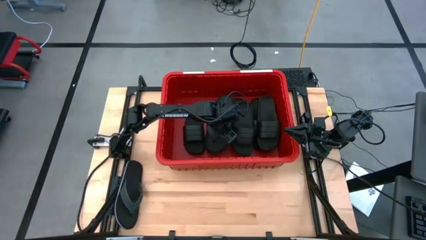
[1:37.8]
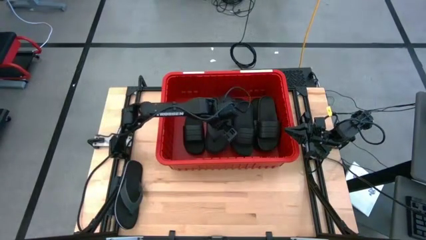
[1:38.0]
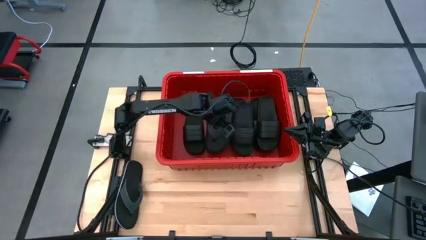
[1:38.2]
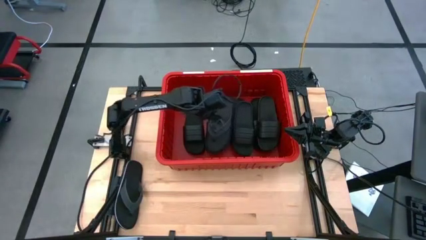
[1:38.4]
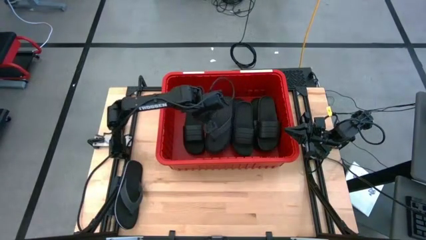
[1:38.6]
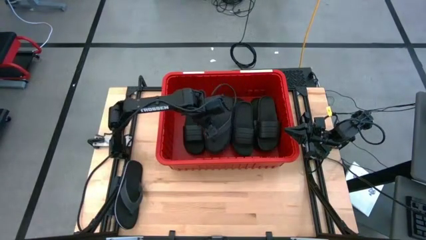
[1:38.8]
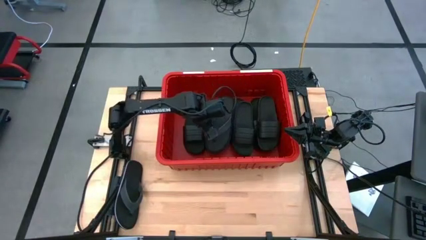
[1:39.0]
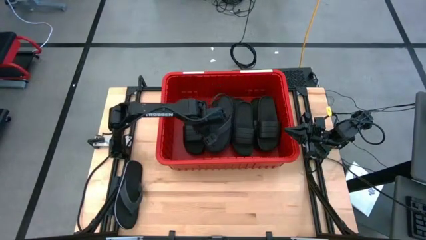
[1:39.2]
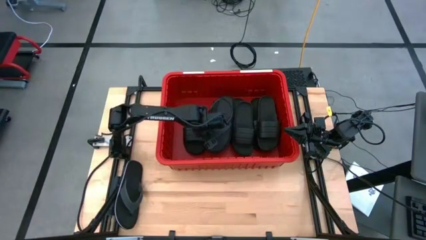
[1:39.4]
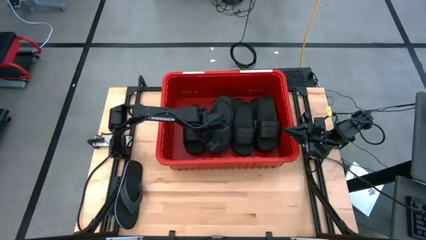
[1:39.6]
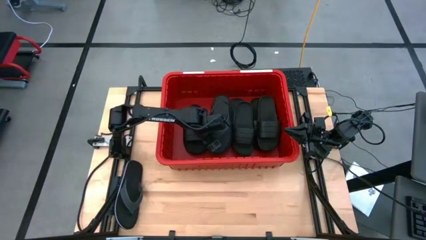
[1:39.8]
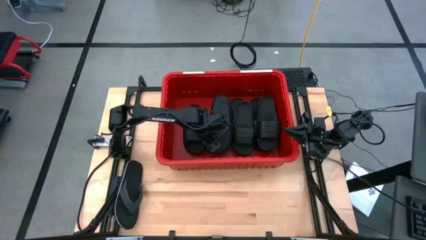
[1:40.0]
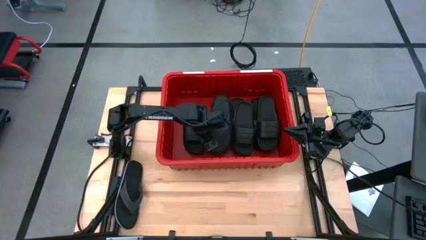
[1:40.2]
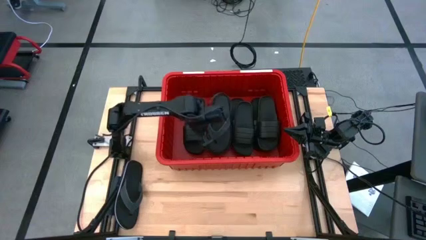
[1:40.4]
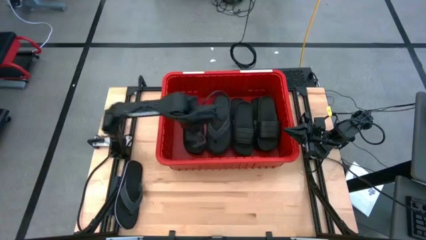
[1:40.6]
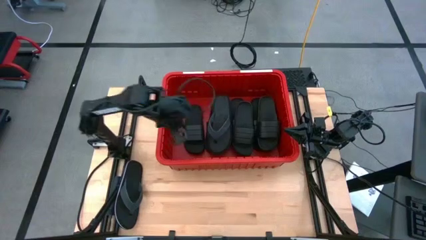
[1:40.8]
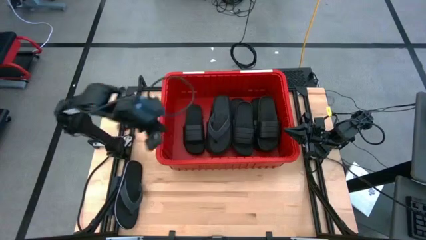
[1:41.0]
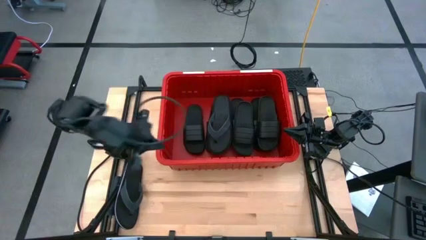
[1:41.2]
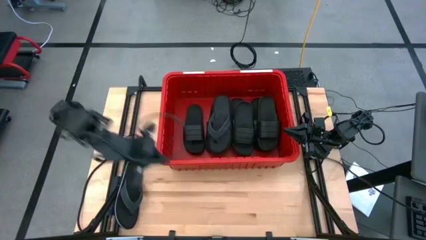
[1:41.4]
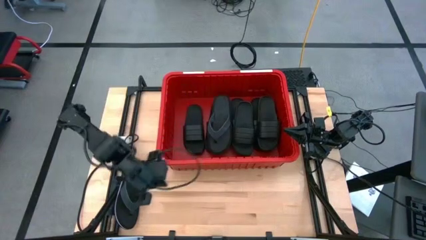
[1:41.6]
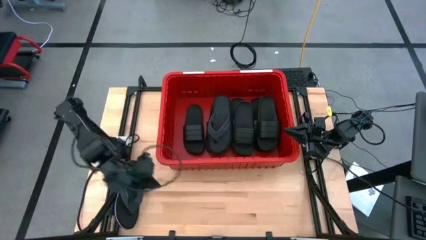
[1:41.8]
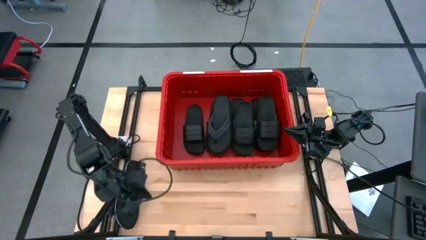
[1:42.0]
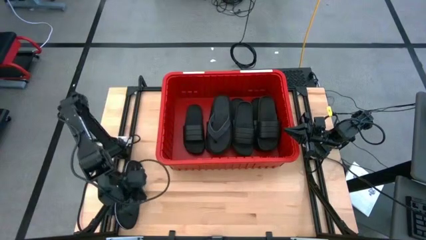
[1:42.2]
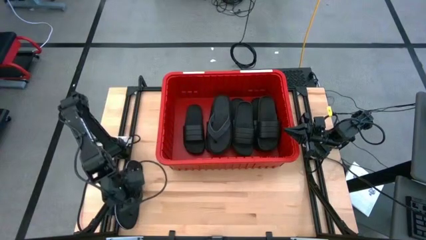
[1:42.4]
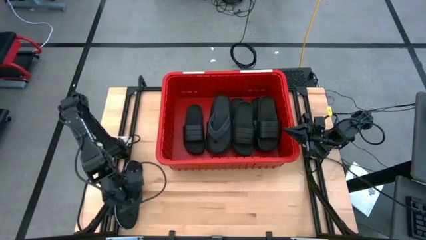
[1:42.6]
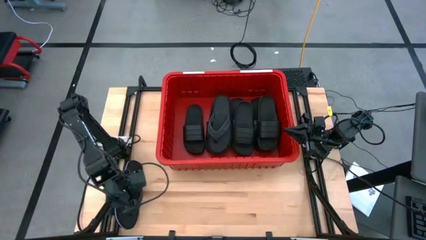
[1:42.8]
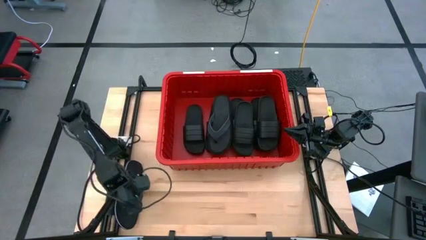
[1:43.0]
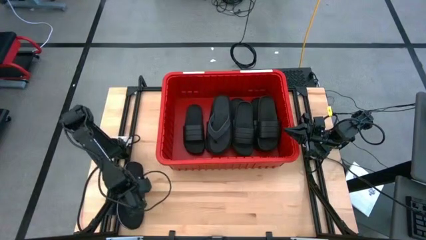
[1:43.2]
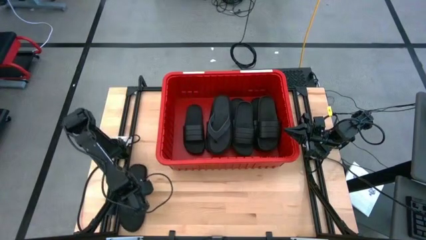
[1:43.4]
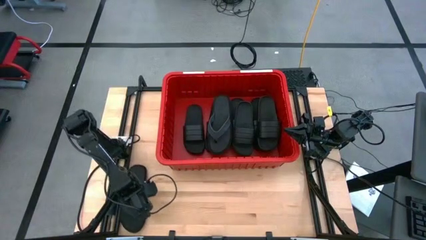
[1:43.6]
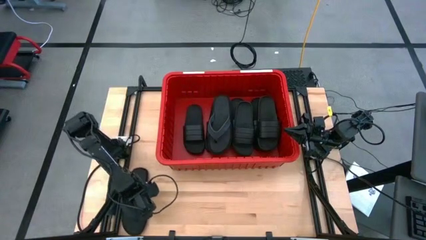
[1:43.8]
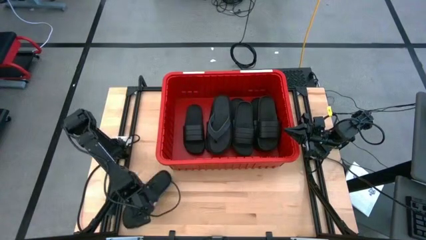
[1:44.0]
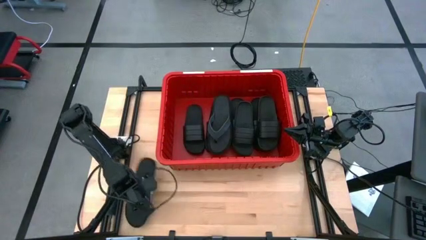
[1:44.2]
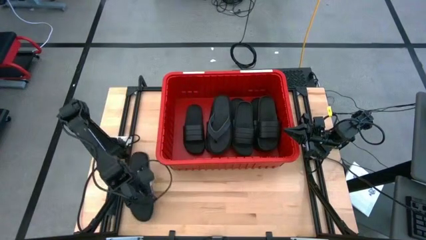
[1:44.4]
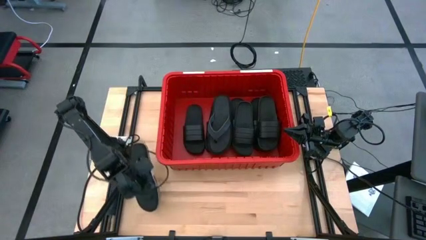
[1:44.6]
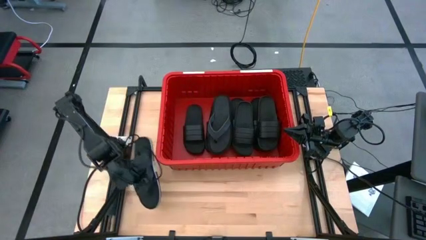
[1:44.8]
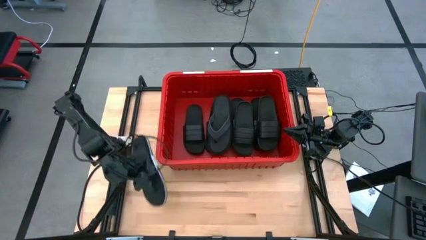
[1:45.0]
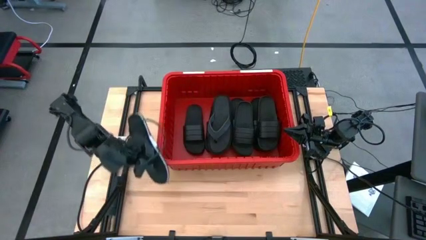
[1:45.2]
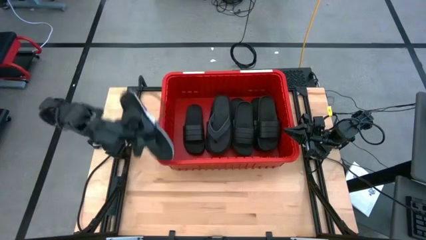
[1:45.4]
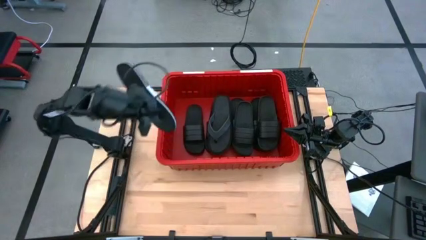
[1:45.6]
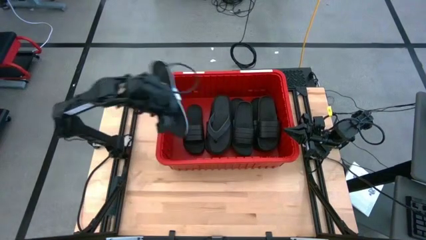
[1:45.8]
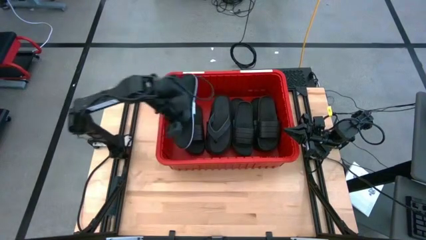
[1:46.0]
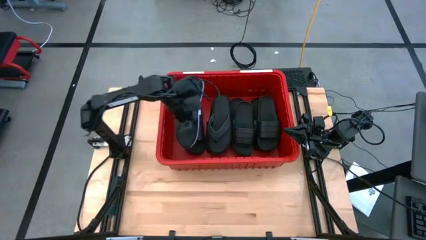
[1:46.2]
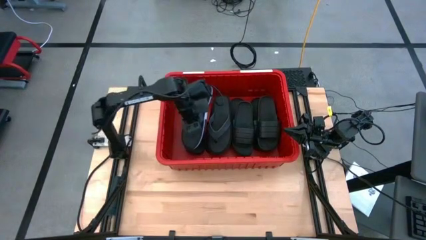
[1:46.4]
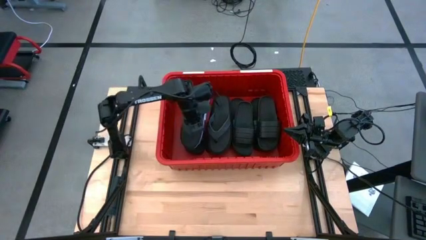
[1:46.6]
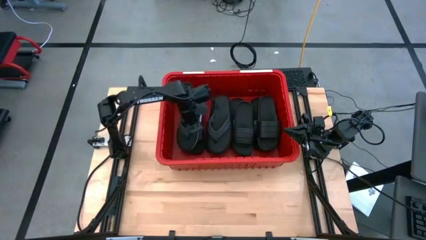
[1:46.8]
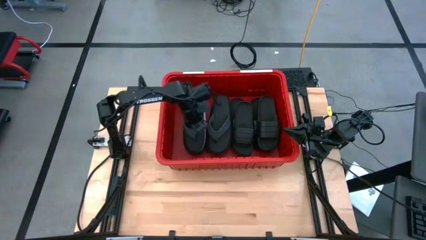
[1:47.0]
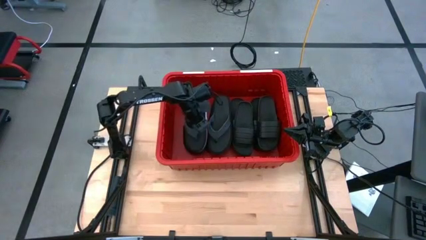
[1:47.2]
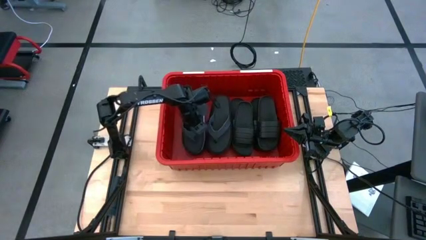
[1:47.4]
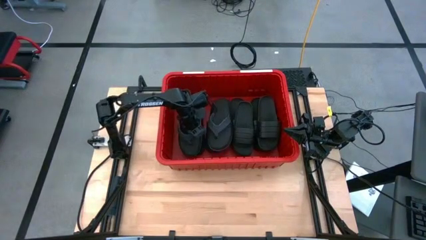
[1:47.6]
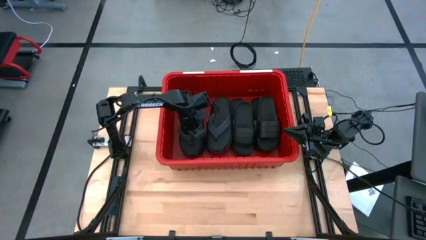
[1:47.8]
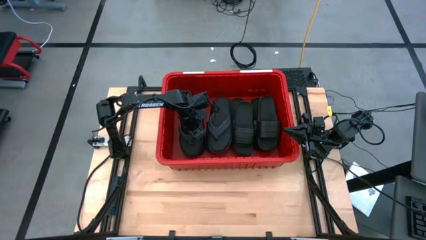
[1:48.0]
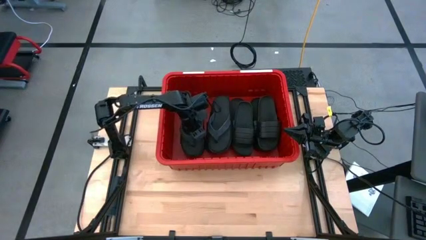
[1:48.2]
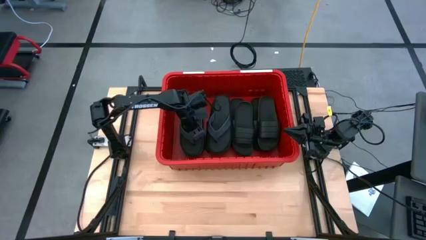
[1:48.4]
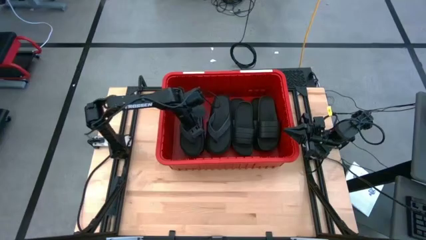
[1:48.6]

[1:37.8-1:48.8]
Task: Pick and place slides into bin
Put the black slipper into the red bin

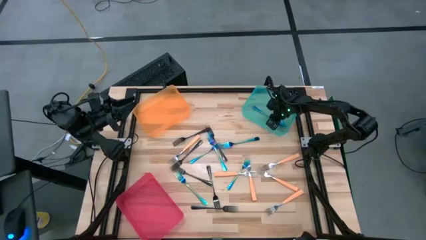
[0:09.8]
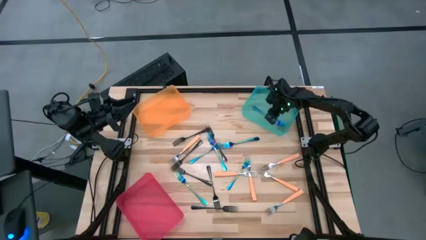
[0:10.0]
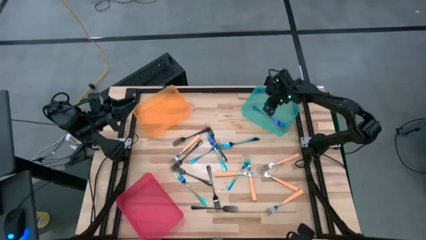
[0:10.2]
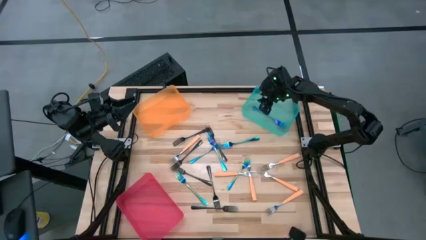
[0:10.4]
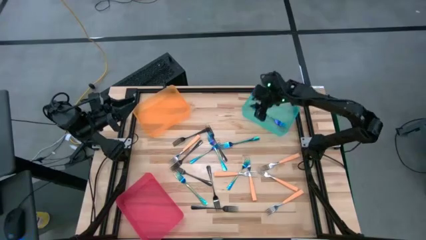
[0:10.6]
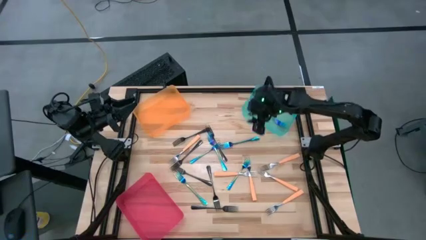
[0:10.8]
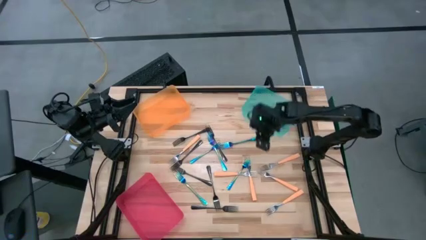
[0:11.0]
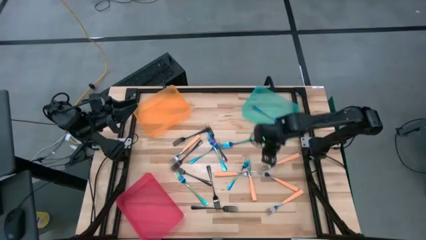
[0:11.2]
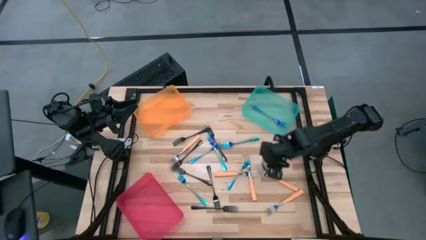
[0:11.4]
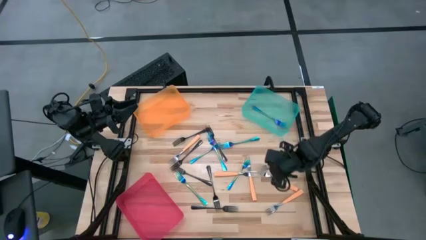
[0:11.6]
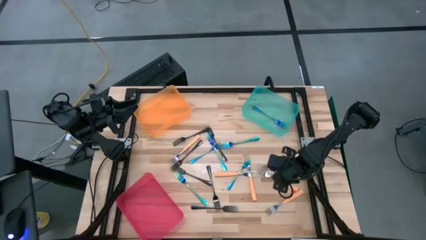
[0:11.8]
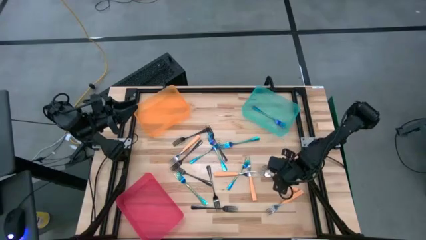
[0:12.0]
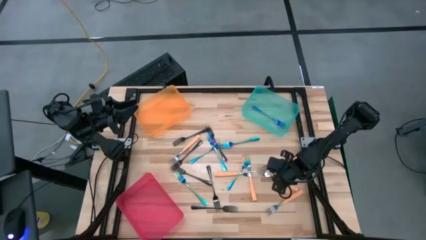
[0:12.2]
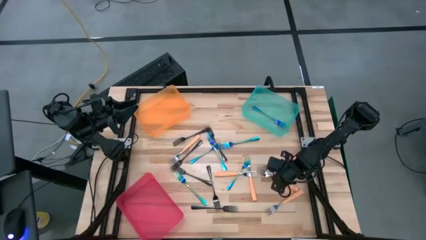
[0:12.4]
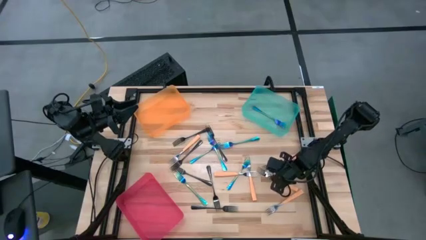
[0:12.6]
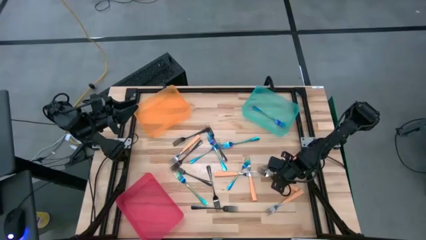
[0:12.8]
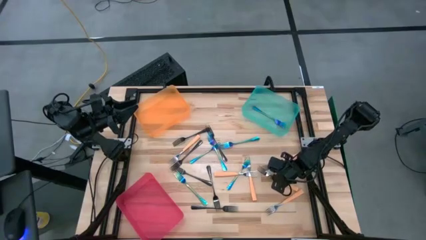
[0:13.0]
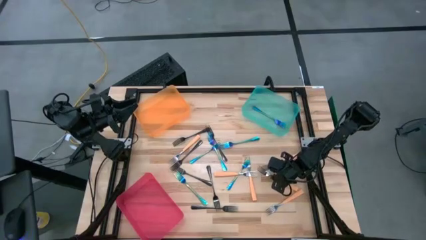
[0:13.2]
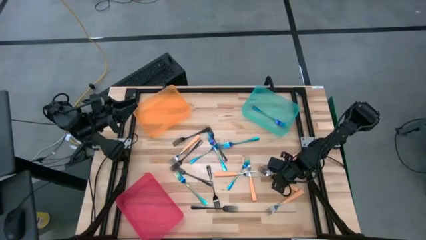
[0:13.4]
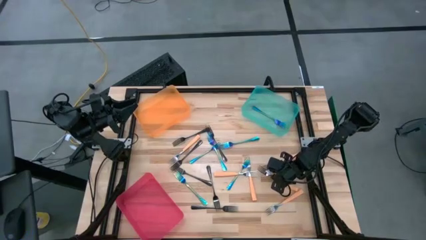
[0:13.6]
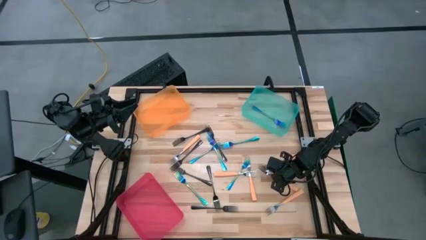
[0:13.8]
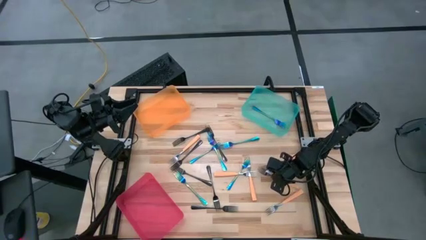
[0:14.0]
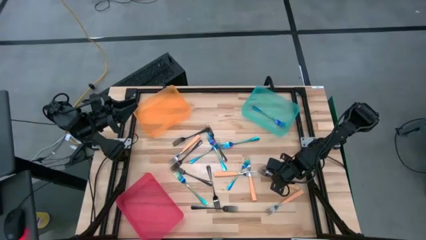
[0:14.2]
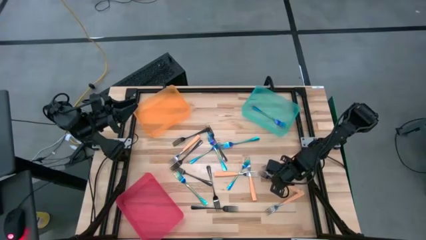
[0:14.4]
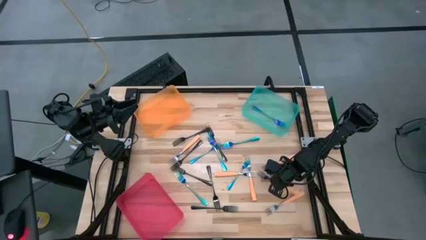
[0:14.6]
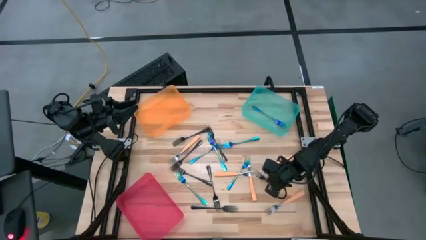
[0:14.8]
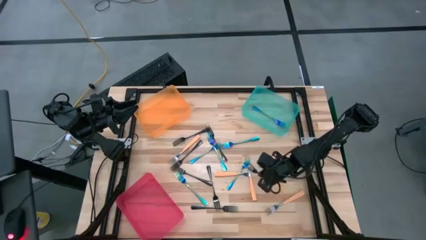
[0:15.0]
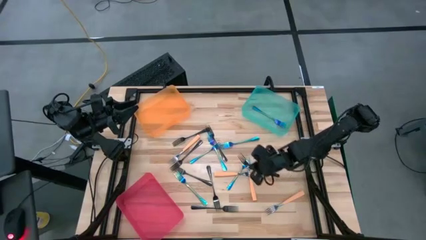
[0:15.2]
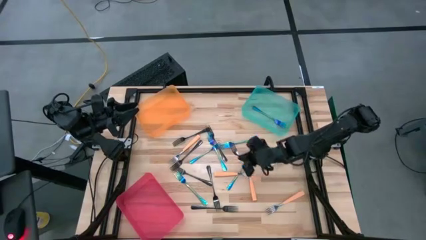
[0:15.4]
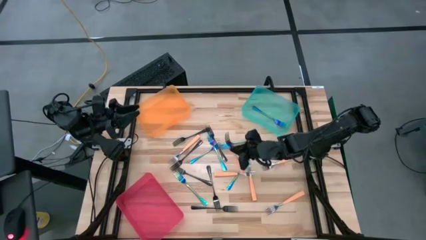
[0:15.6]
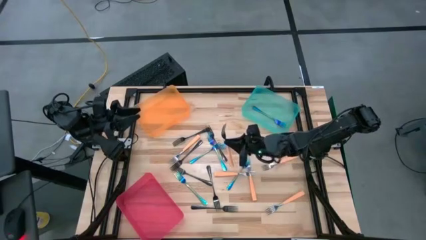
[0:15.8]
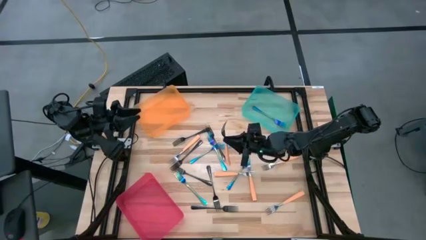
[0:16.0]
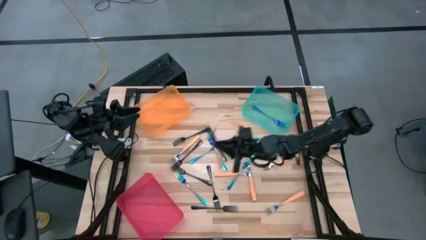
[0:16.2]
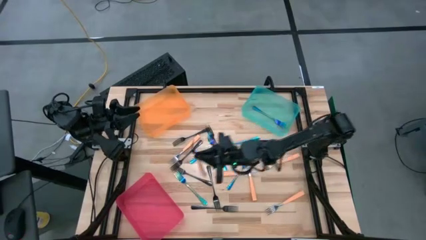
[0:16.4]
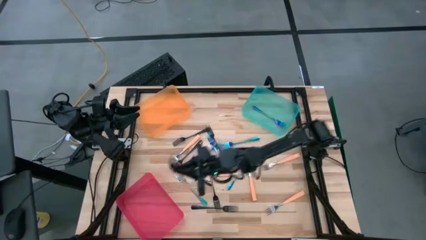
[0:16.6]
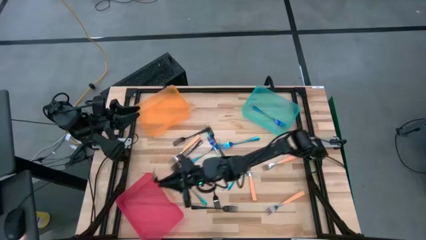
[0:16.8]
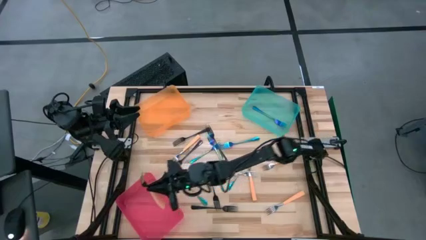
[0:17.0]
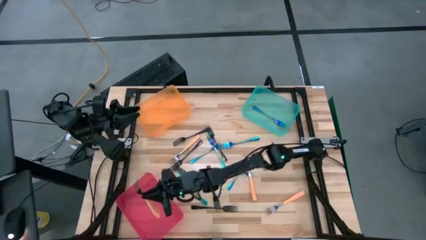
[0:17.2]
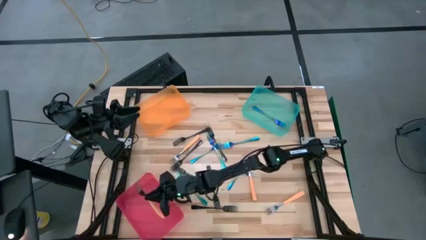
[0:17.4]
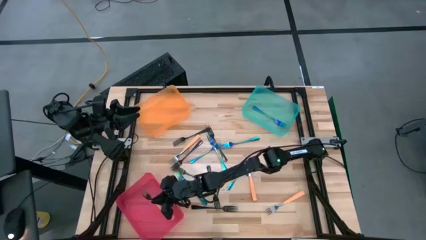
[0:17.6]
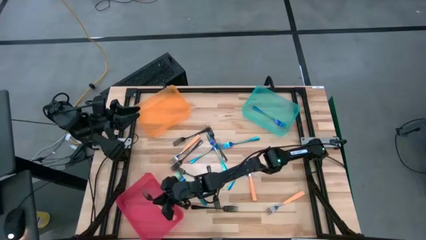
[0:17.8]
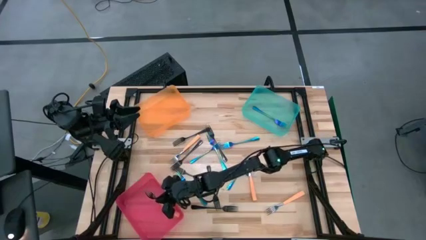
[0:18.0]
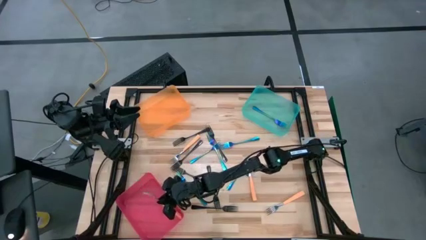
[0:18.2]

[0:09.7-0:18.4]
Task: Sort silverware by color (type)
Put the orange fork into the pink bin
